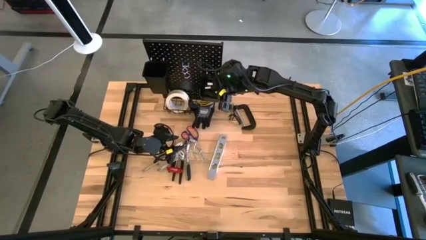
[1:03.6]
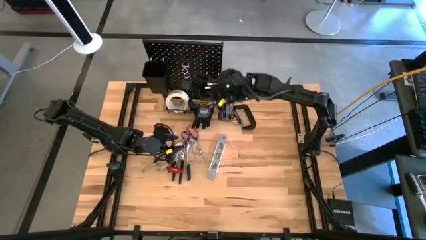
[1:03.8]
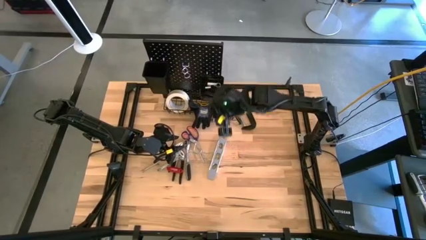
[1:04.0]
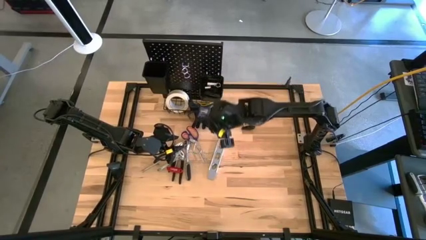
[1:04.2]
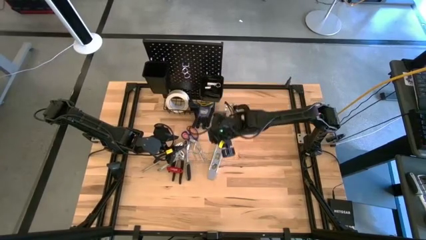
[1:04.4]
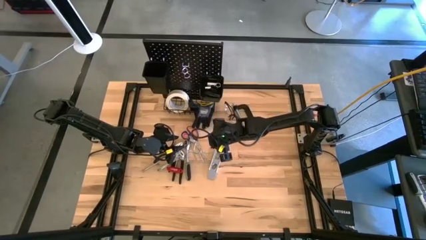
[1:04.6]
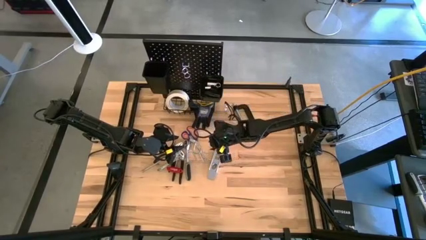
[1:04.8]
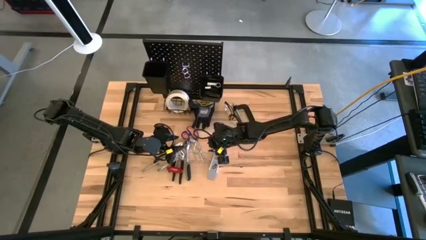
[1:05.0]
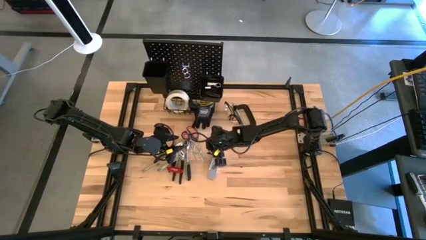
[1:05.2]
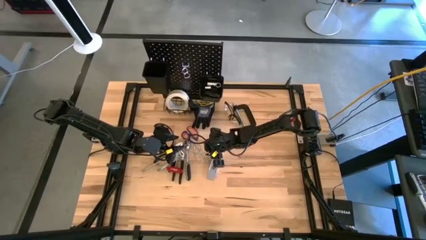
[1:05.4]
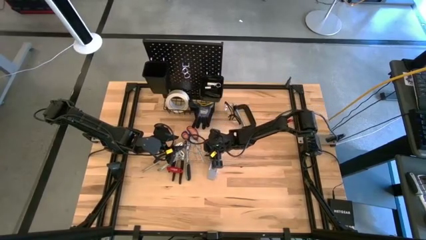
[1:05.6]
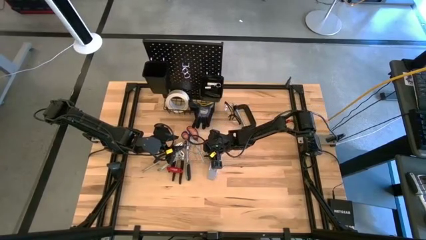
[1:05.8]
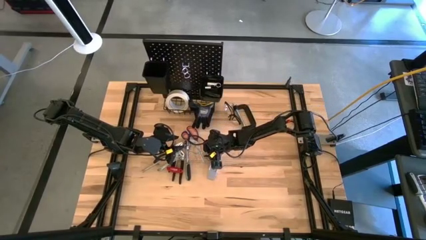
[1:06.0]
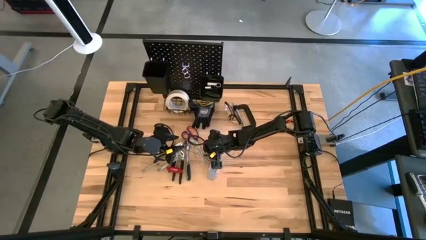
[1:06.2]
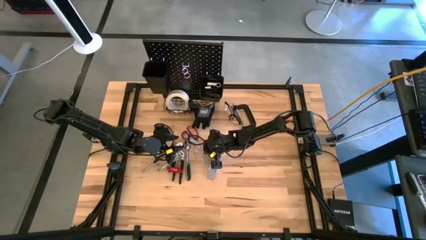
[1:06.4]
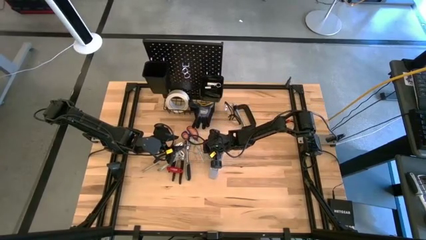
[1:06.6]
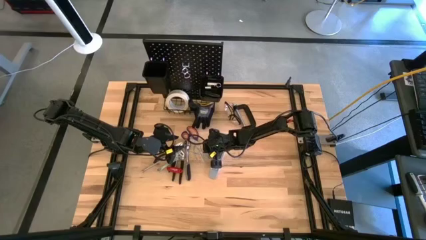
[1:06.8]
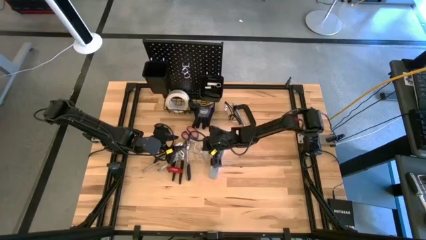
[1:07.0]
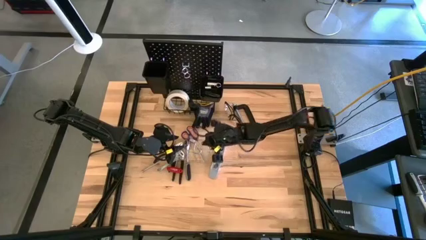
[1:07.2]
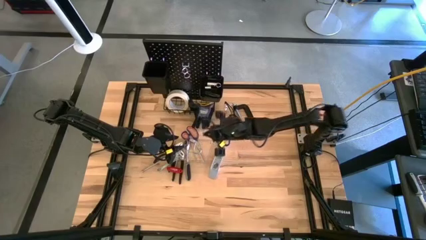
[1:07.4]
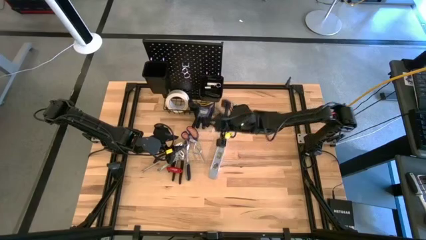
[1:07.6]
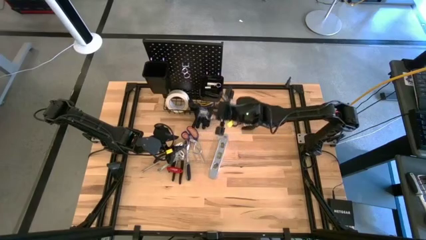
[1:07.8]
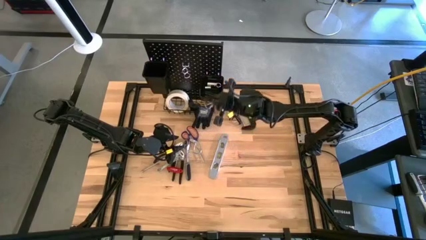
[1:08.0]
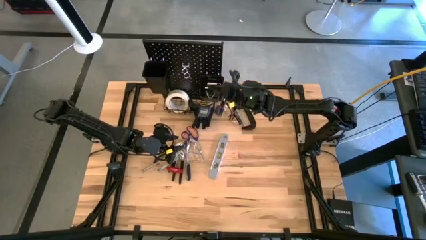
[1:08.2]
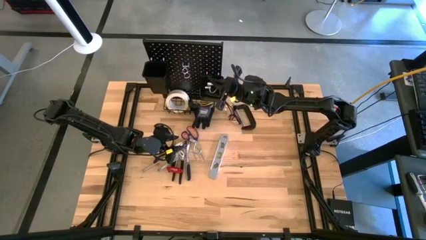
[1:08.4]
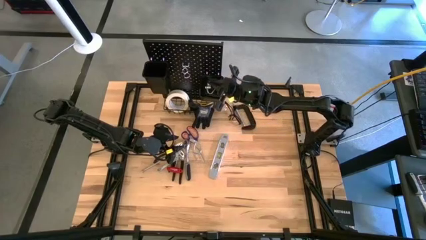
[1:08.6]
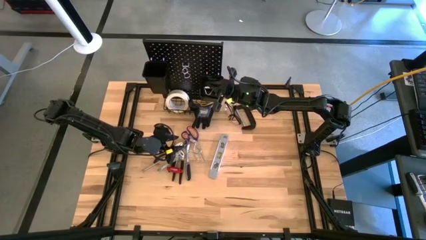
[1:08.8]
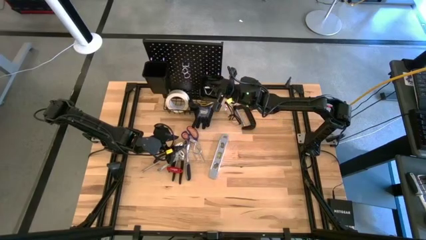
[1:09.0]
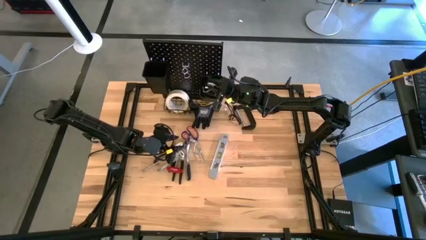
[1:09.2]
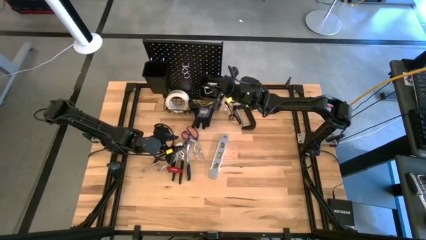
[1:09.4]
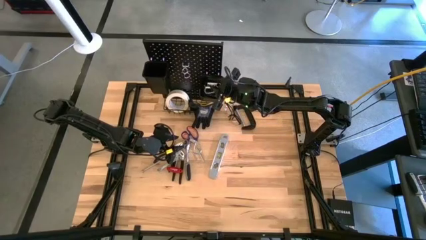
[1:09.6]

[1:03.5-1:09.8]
Task: Hang tools onto peg board
Put the right binder clip into the right black bin on the pegboard

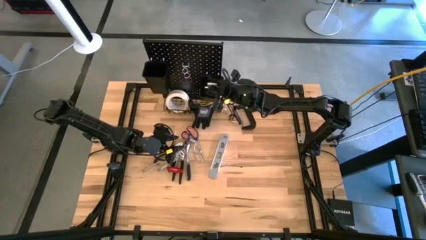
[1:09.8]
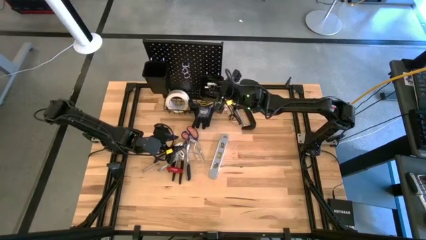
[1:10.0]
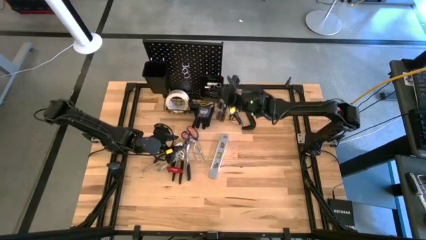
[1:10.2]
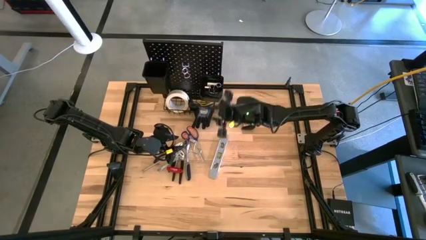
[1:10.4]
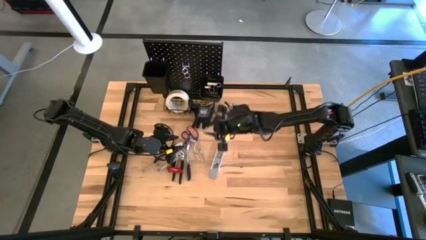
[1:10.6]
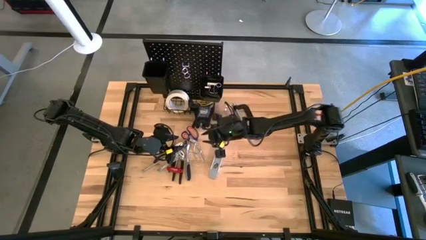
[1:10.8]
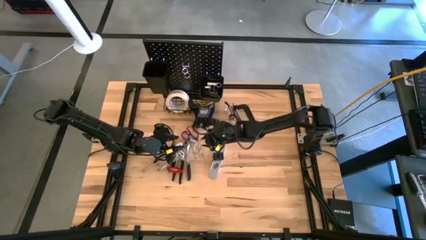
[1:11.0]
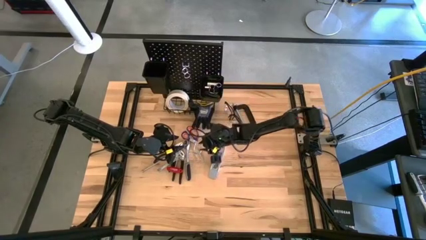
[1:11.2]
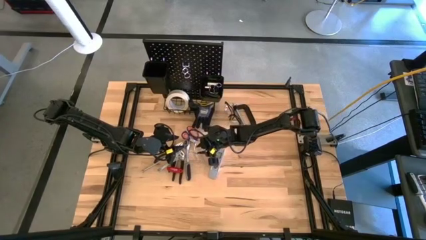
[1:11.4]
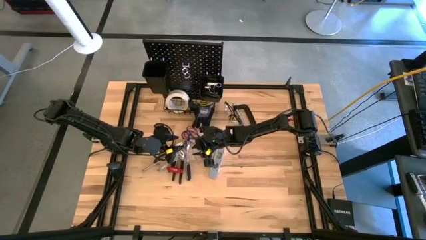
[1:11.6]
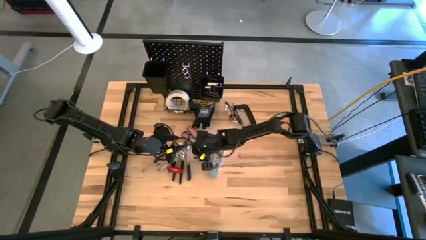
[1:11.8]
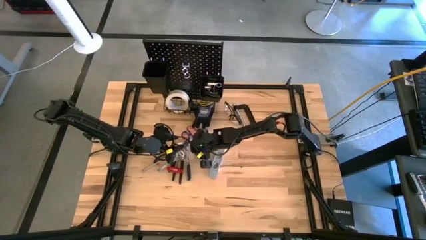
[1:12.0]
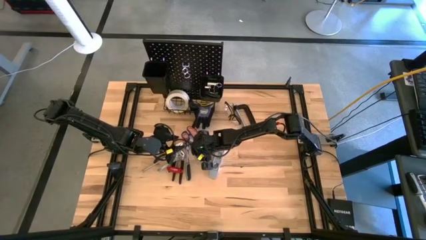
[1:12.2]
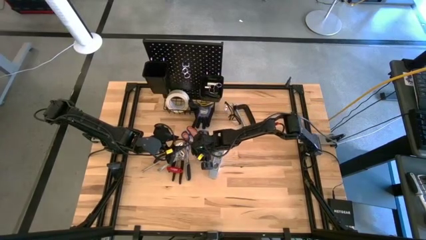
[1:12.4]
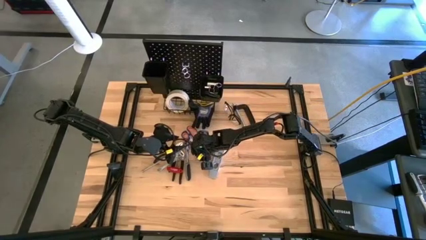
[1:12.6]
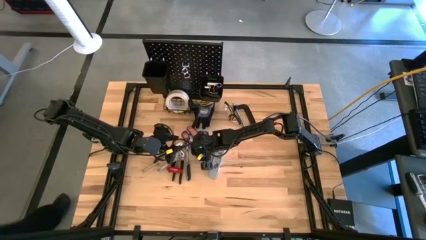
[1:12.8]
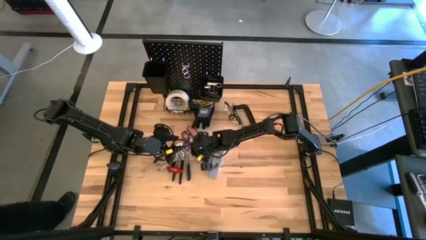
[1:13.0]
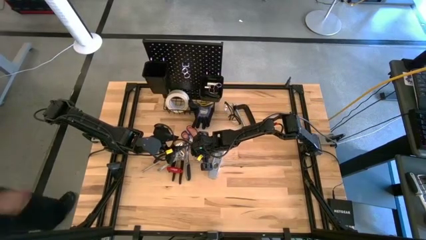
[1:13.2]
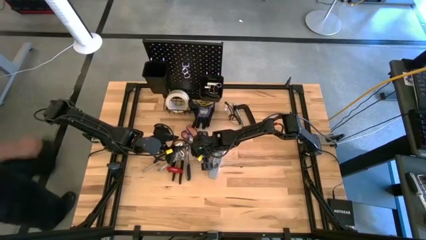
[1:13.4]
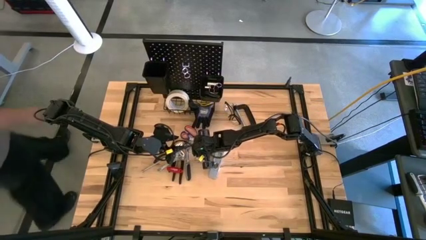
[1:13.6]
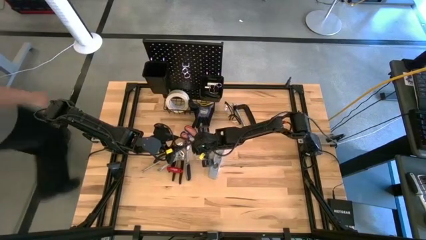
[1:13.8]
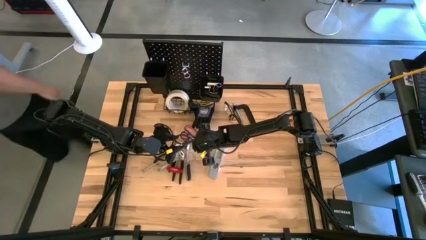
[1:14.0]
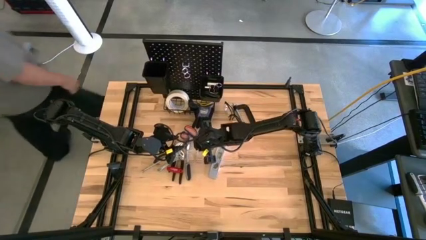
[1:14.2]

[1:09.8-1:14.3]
Put the top hanger hook into the right black bin on the pegboard

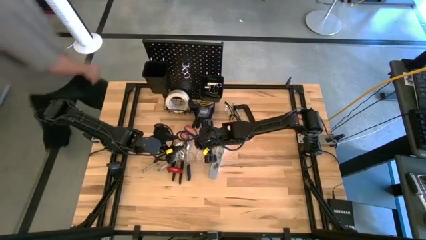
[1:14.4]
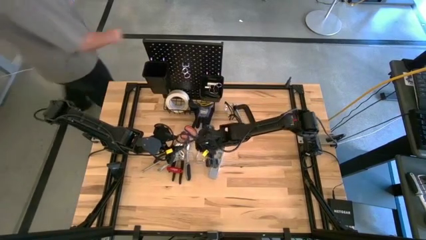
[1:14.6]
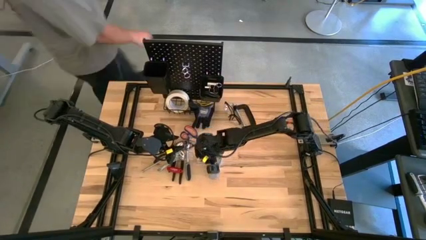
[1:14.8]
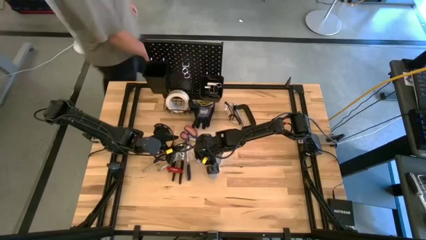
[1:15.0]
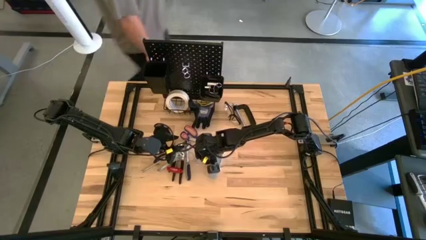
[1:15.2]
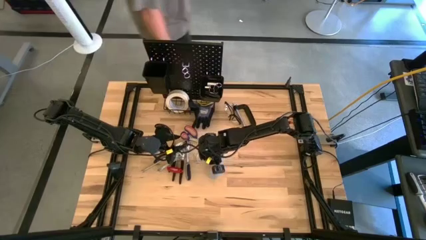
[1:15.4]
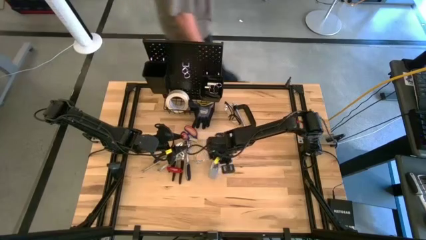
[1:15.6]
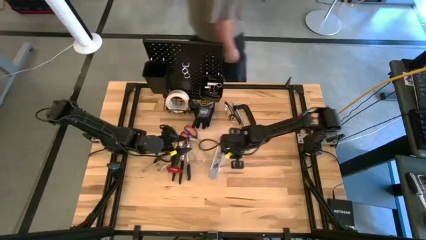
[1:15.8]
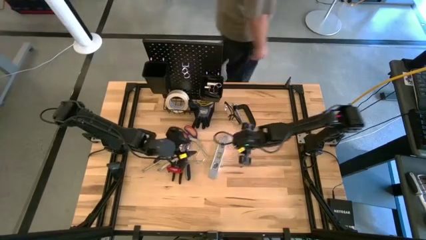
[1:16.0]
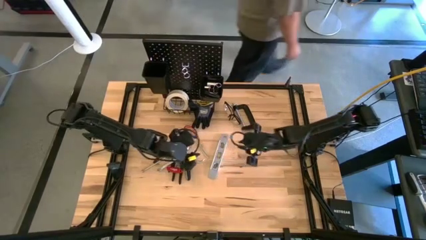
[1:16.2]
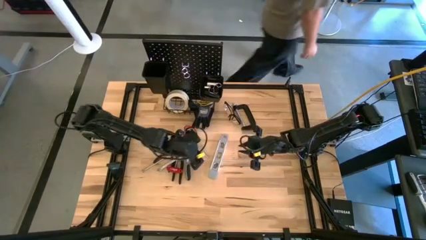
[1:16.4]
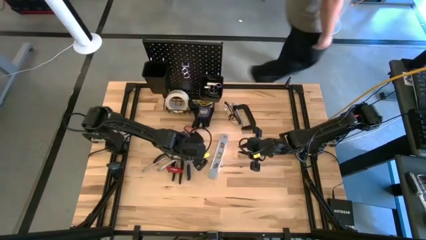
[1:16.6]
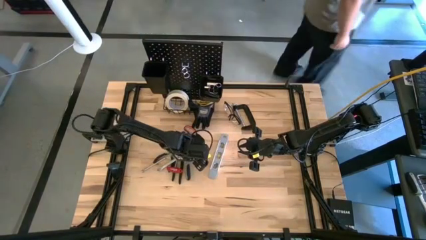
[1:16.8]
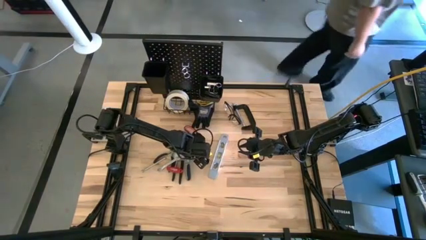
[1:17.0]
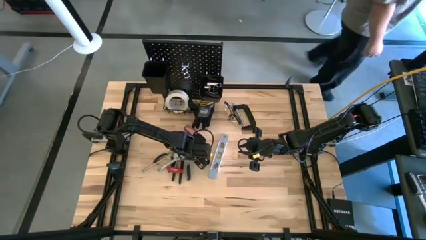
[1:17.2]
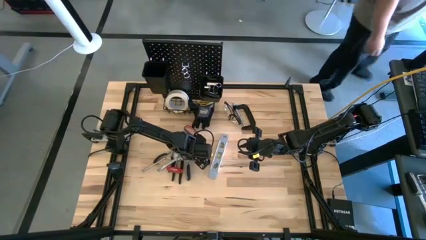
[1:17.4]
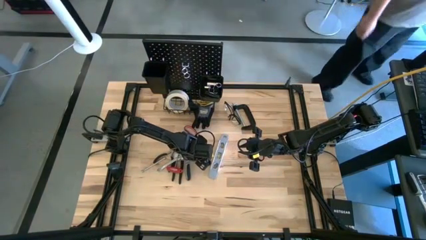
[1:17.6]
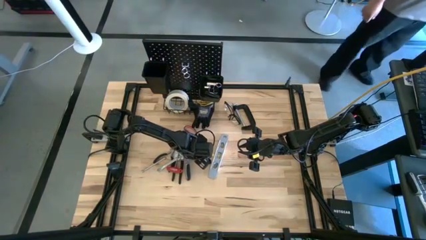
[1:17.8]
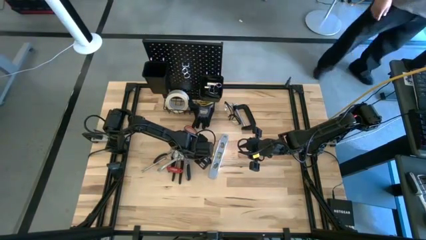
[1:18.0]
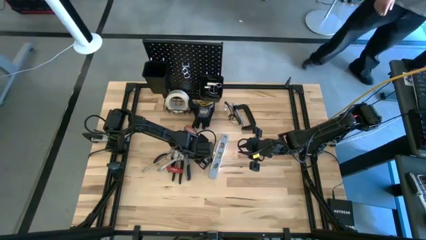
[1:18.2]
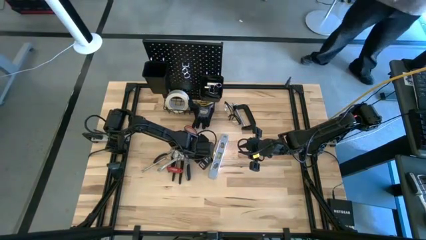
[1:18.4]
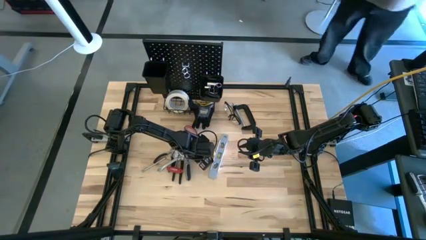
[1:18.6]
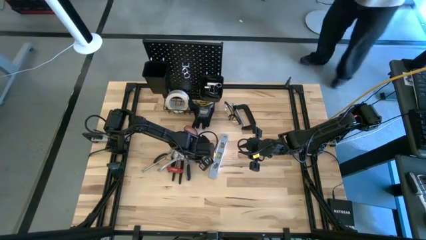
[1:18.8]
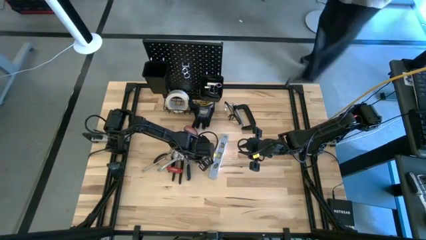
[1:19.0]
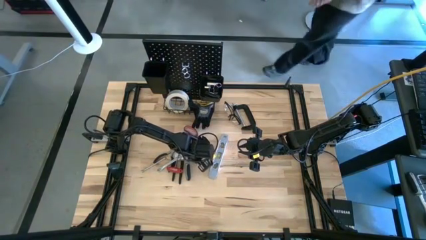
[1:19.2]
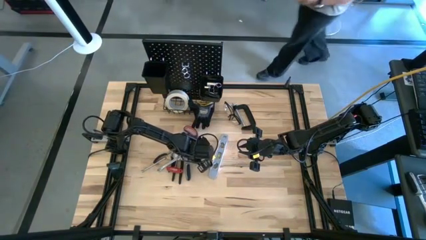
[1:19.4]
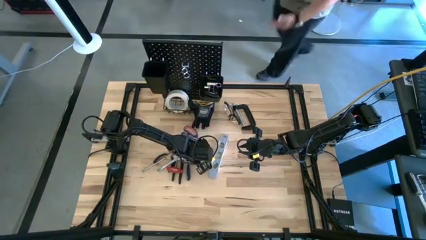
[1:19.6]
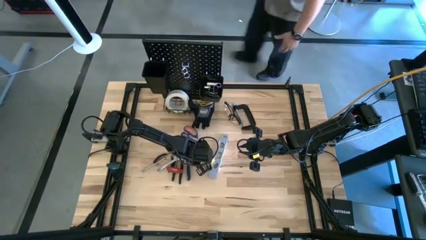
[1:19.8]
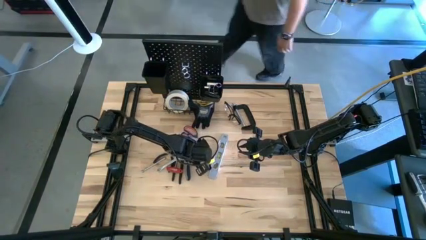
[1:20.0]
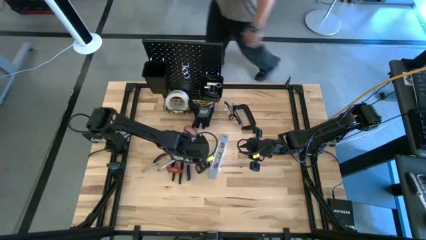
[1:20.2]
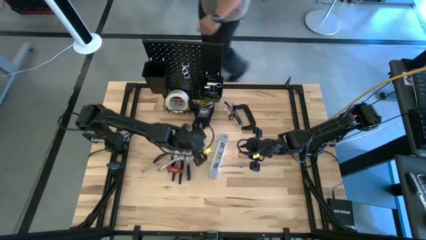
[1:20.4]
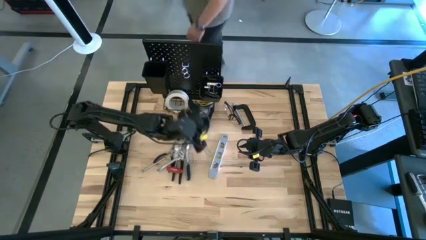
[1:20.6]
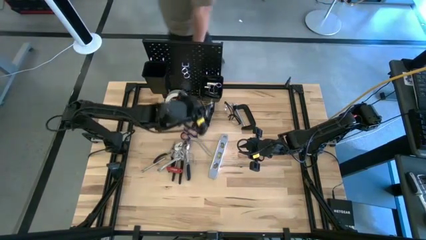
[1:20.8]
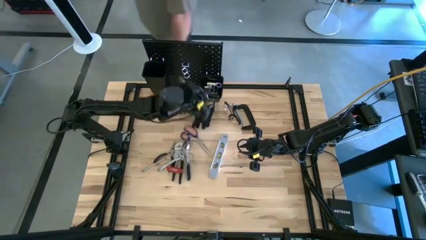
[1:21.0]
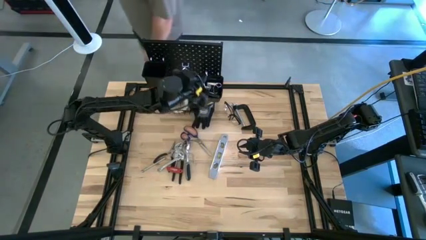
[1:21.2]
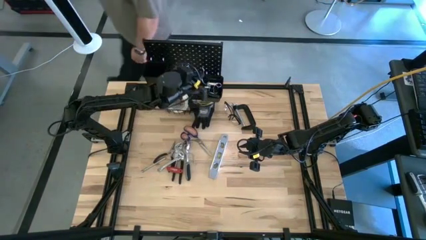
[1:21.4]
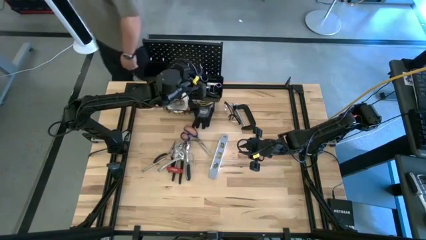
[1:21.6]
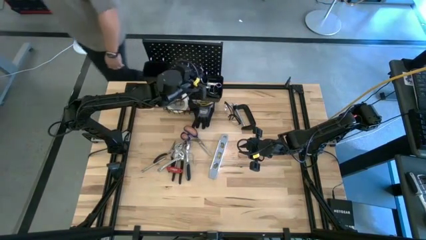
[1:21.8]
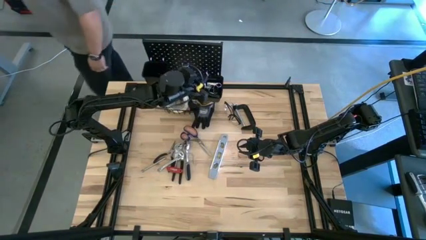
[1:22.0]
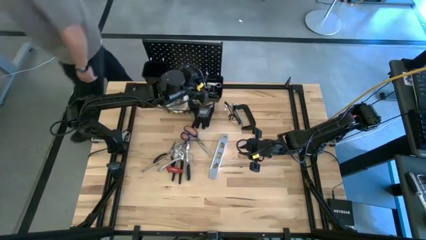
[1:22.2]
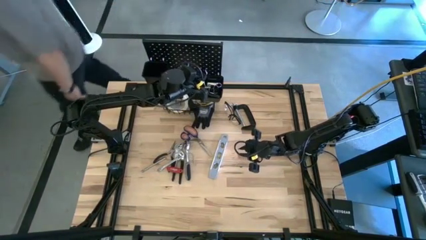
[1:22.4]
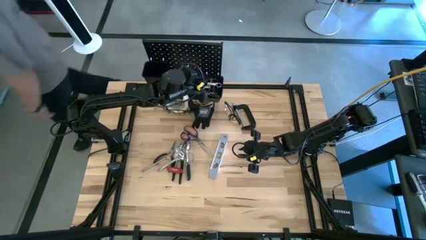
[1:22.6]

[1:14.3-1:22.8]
Put the top hanger hook into the right black bin on the pegboard
